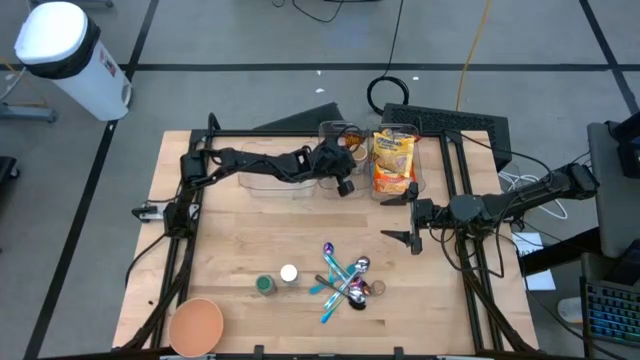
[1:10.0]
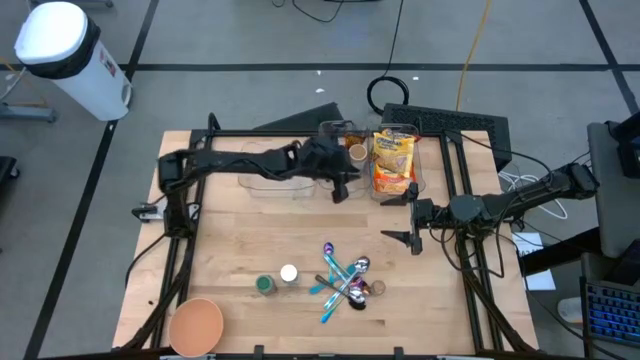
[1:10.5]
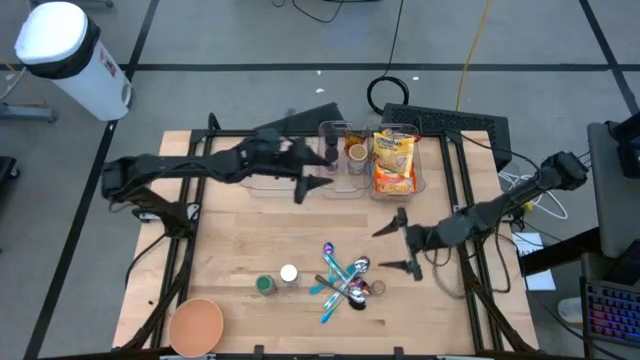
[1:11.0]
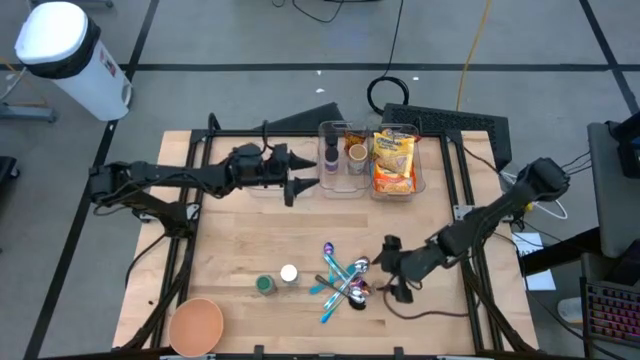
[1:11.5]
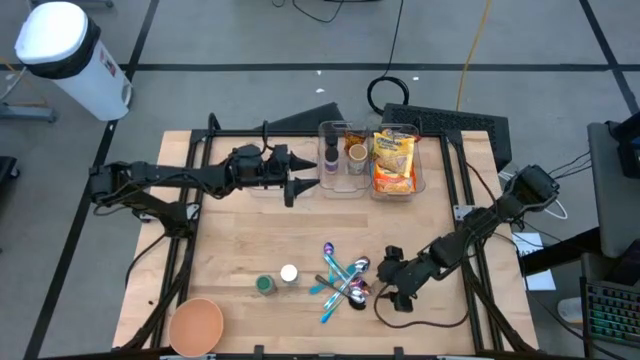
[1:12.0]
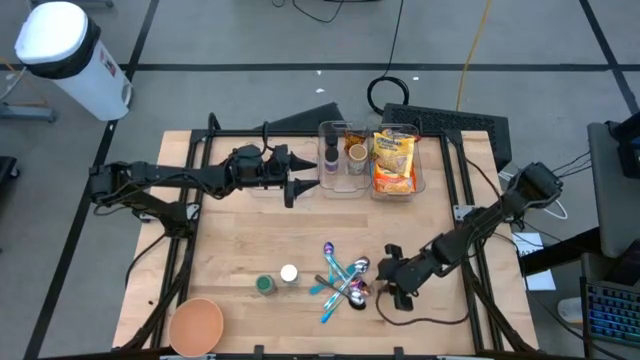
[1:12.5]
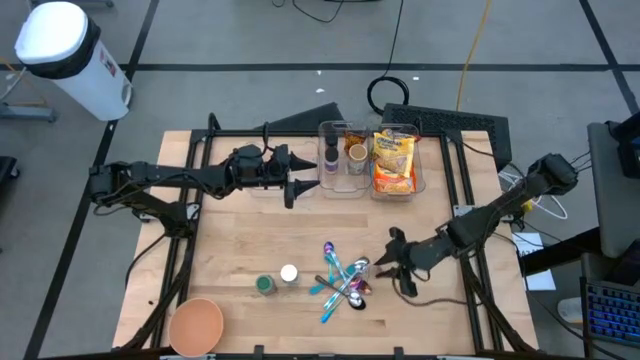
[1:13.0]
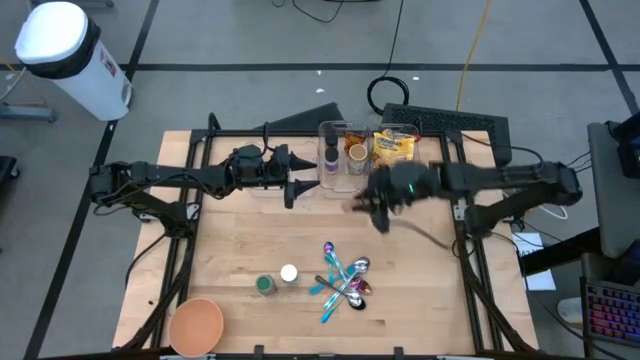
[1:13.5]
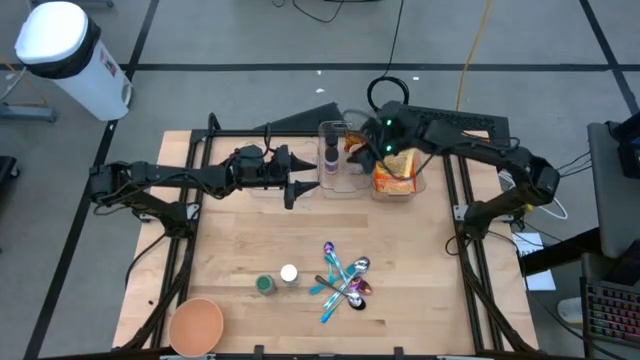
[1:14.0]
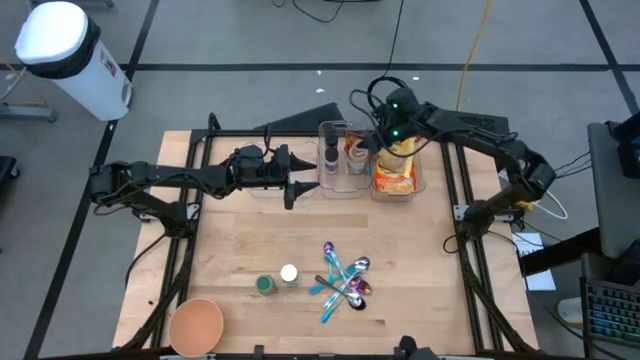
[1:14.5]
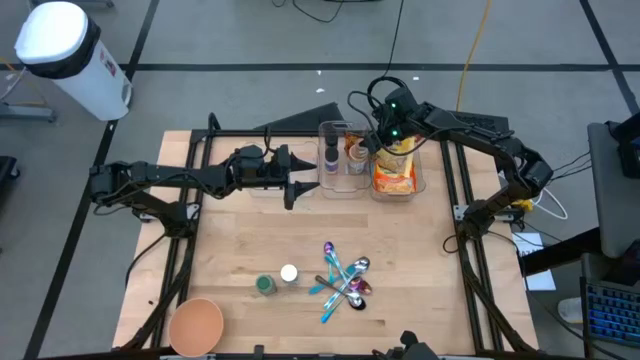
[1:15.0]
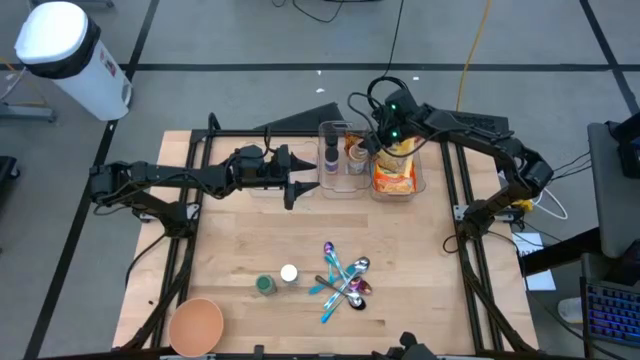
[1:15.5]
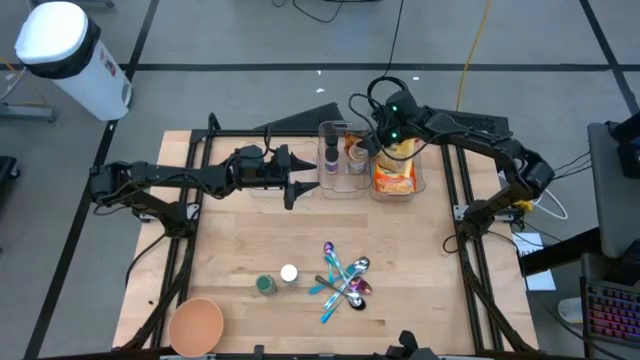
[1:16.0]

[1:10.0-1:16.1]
Task: Pick & Place Food Item
Stack the brown seasoning bottle on top of the gold seasoning bottle in the transparent bin

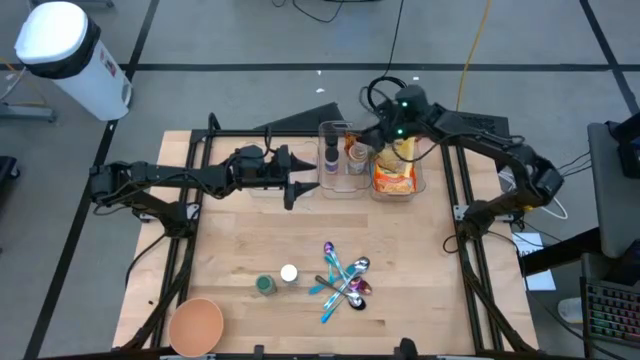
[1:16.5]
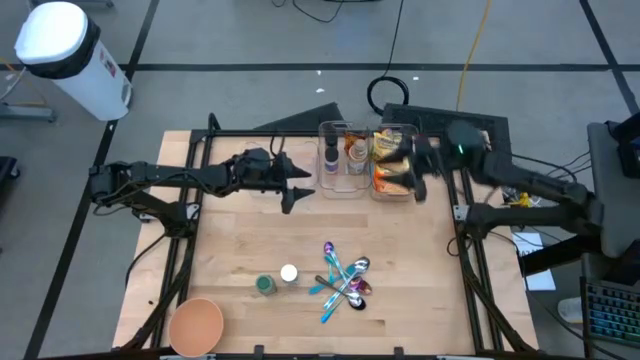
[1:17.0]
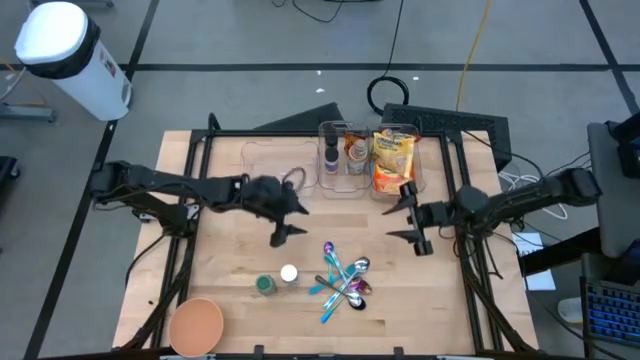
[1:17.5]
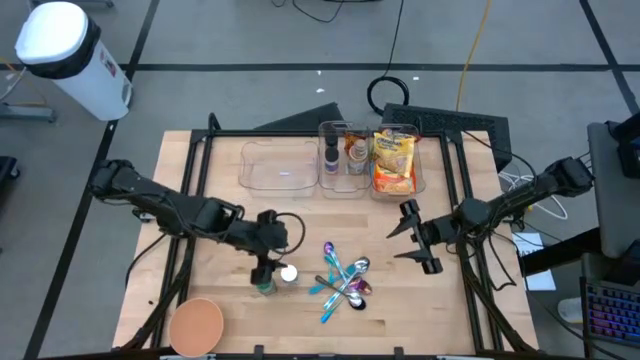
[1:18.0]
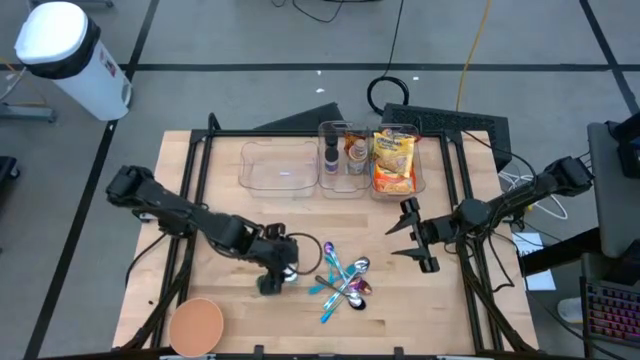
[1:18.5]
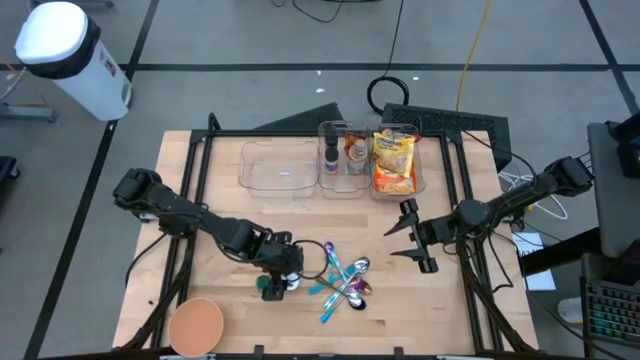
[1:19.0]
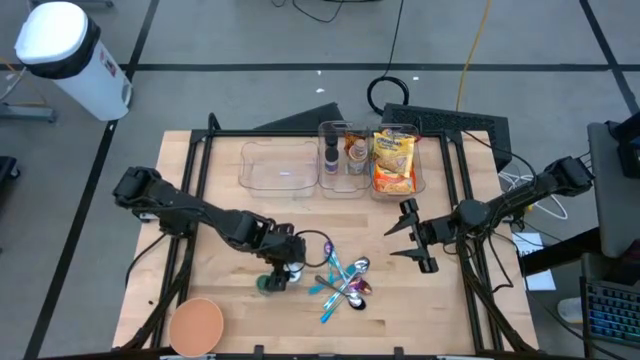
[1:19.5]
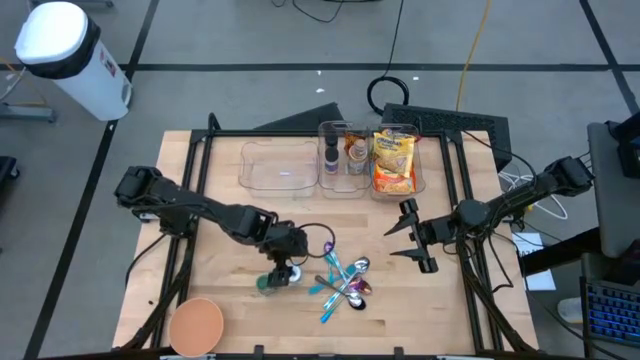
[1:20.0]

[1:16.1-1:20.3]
Put the white seasoning bottle into the middle transparent bin

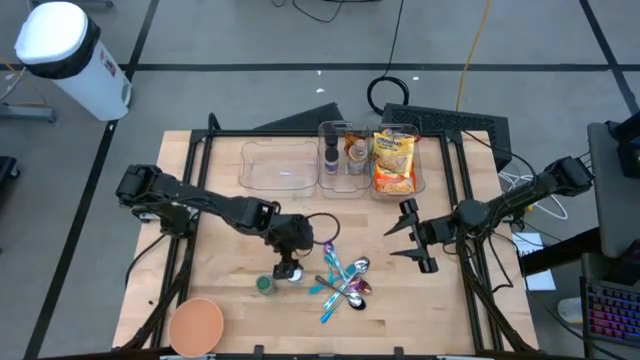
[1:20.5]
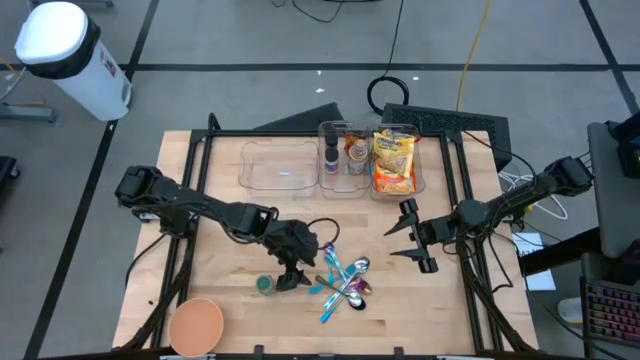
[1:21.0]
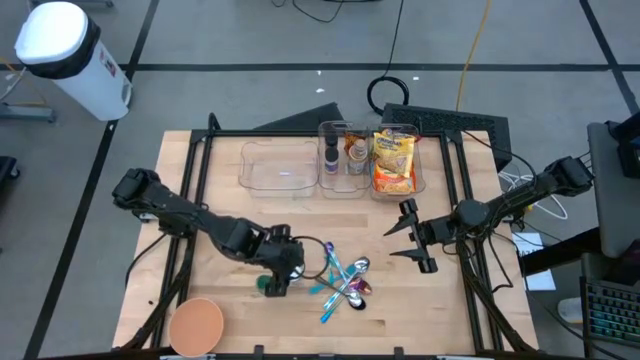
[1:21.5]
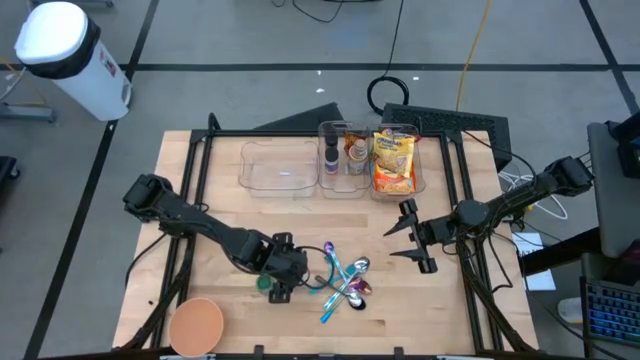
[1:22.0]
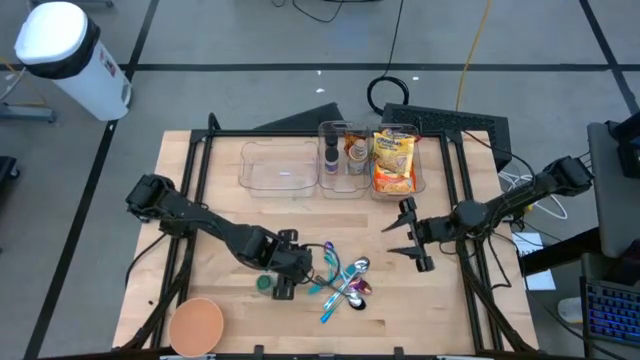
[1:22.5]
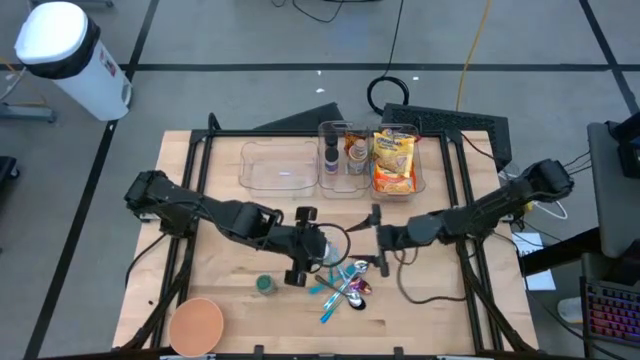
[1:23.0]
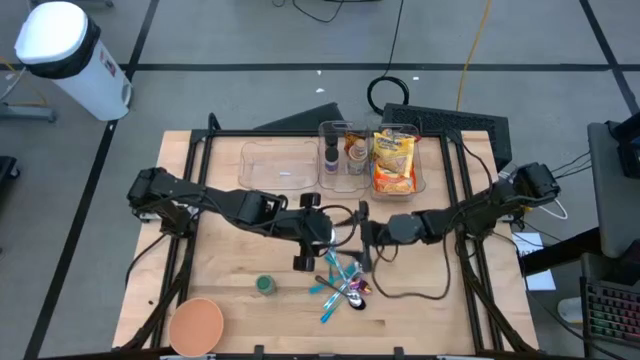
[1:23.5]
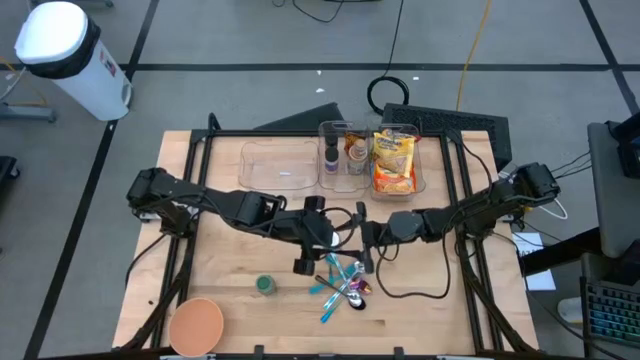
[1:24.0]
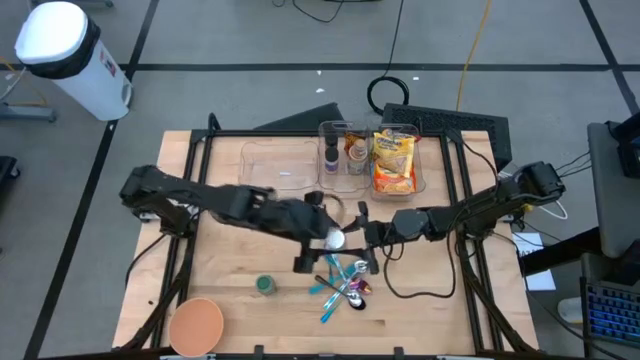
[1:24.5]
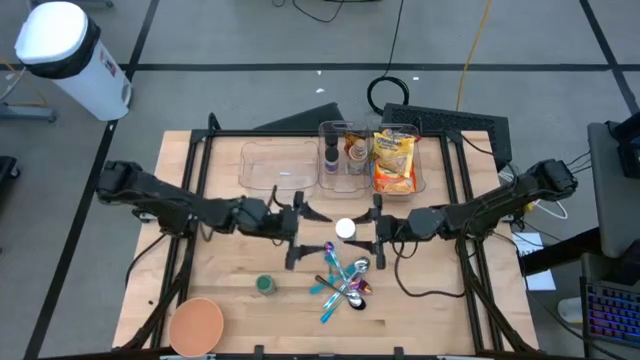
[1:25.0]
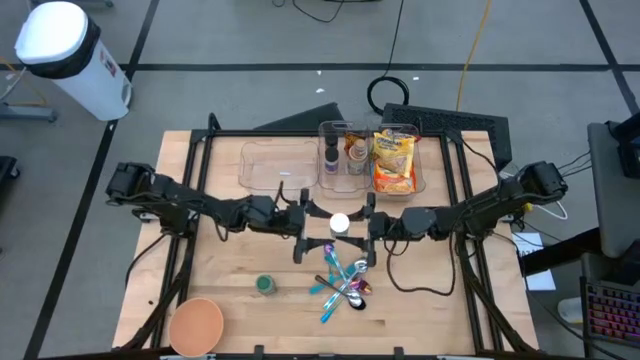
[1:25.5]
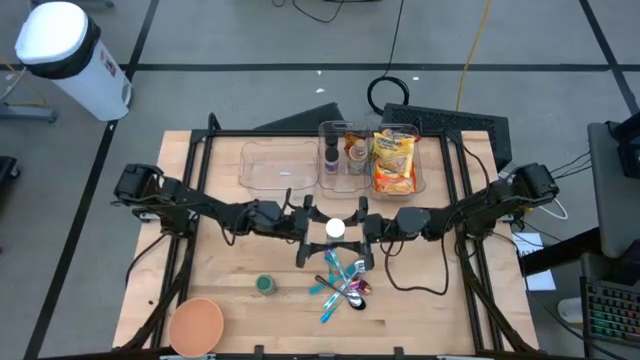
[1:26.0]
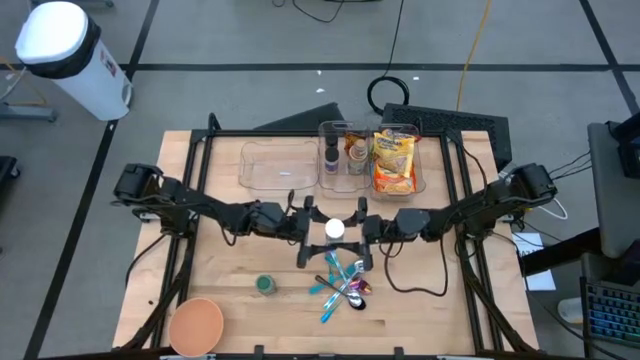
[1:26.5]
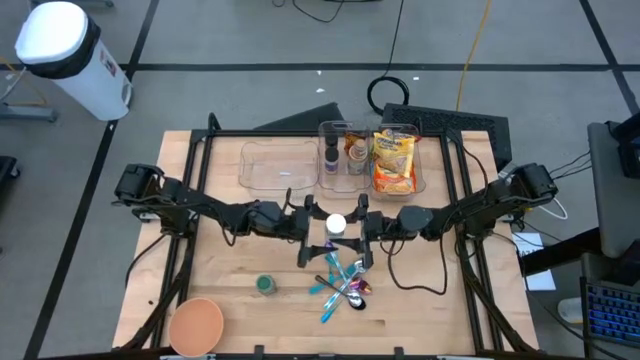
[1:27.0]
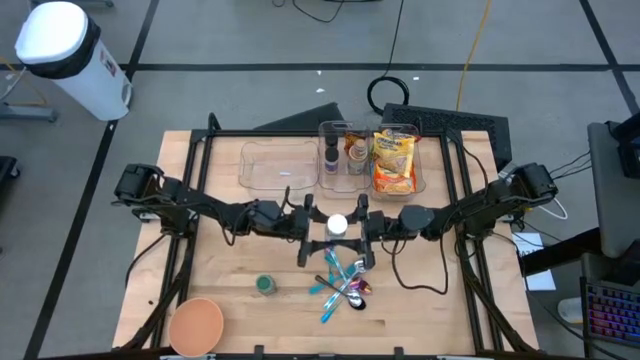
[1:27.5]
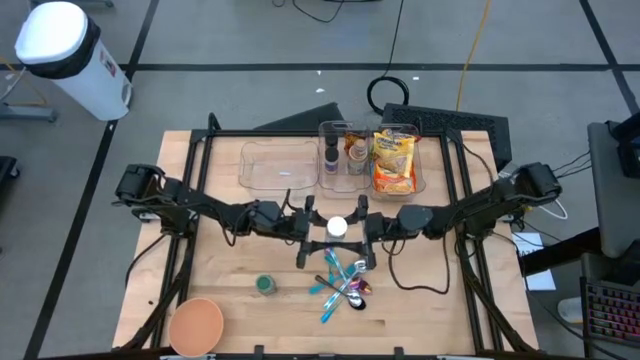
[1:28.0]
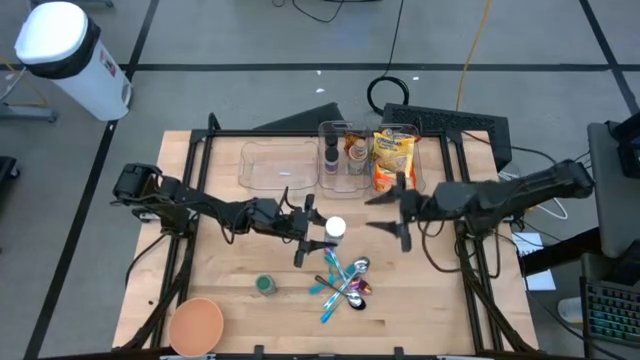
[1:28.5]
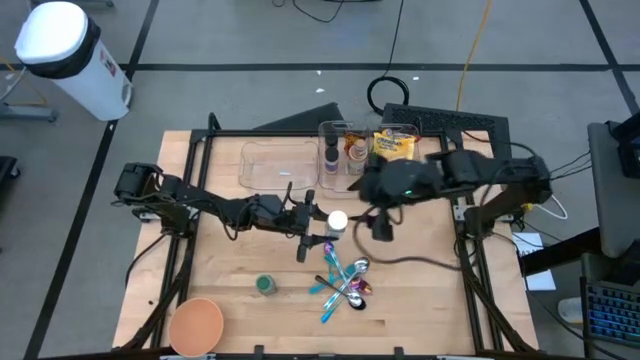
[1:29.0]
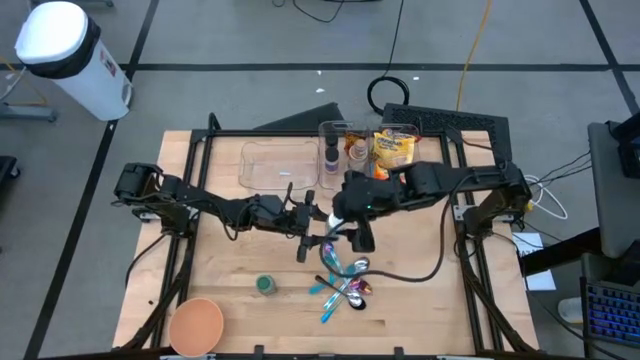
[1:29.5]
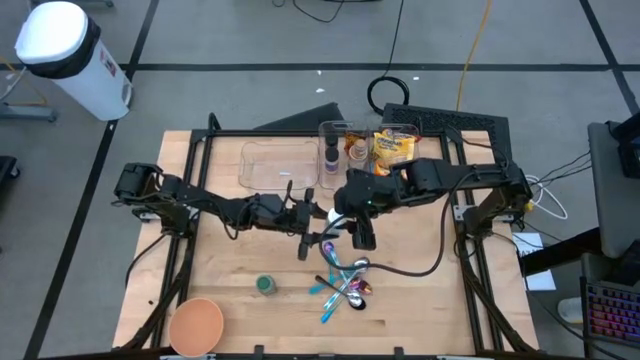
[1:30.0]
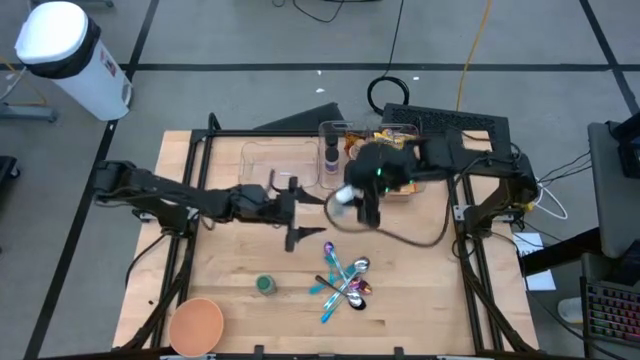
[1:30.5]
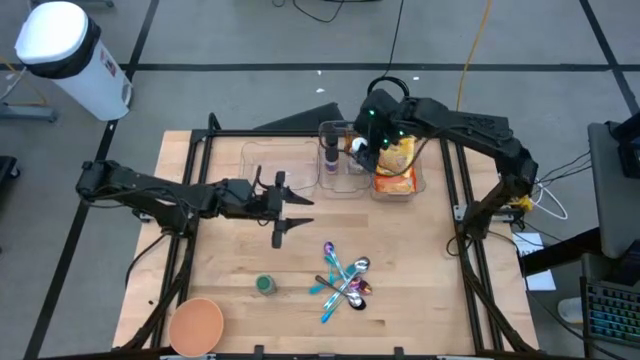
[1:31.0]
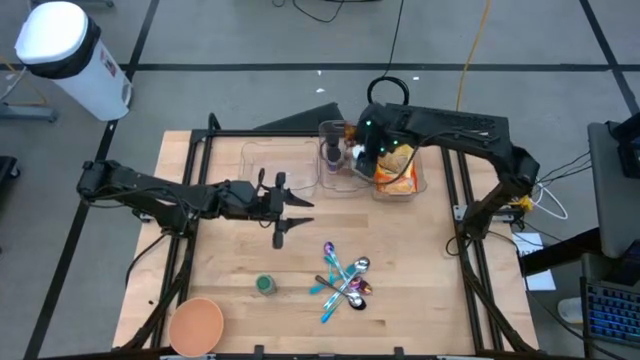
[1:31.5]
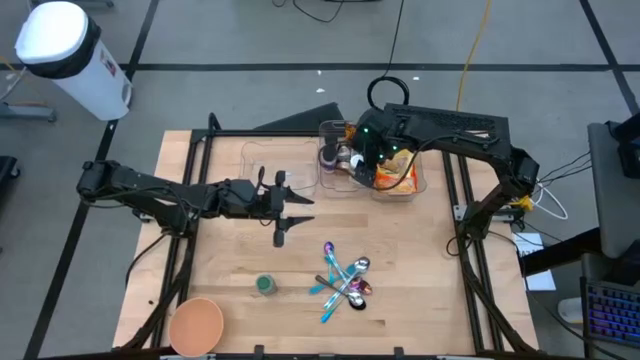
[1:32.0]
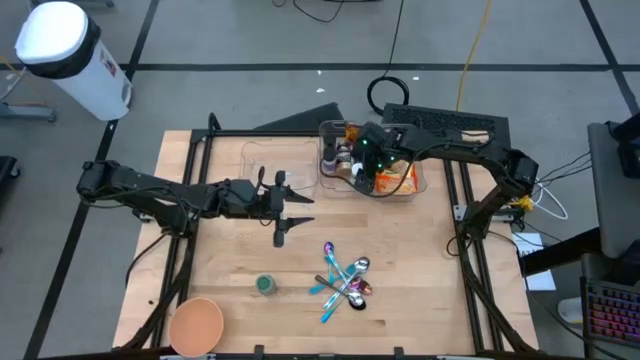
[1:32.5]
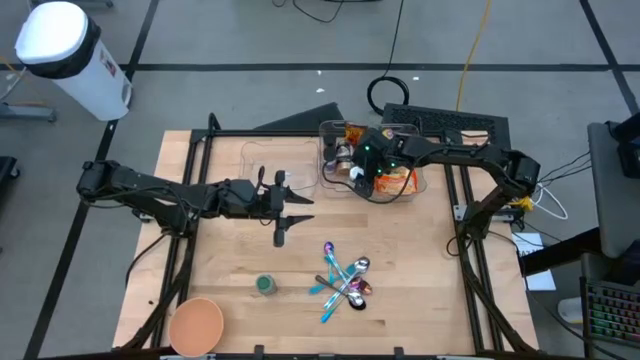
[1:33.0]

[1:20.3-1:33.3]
Put the white seasoning bottle into the middle transparent bin
